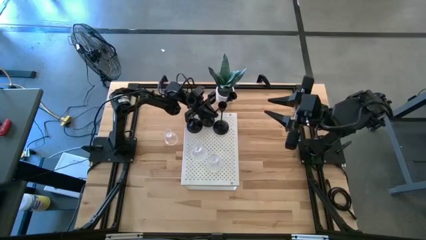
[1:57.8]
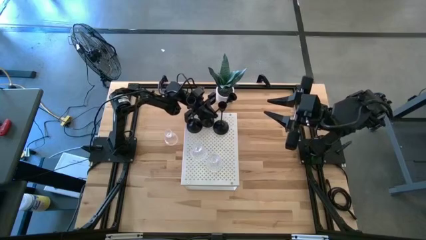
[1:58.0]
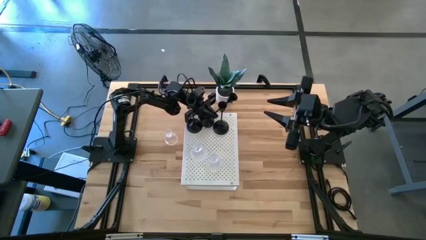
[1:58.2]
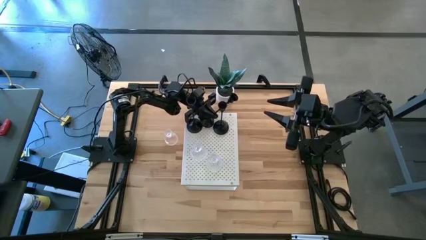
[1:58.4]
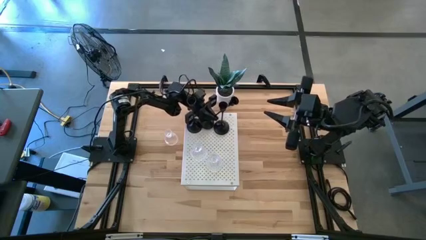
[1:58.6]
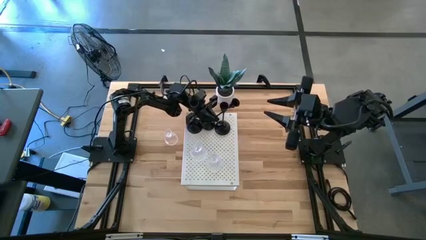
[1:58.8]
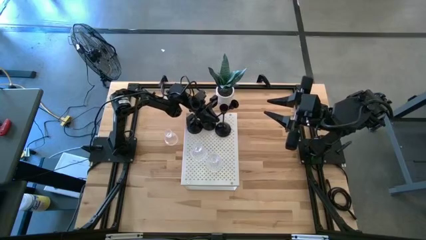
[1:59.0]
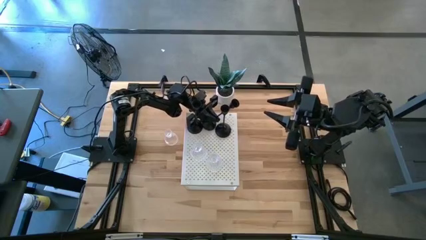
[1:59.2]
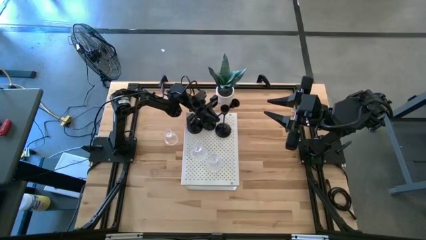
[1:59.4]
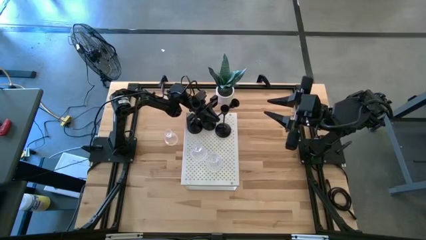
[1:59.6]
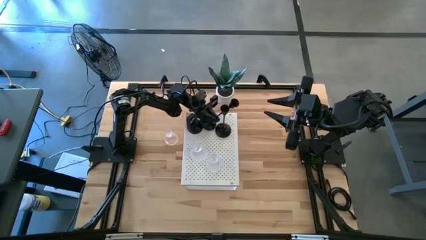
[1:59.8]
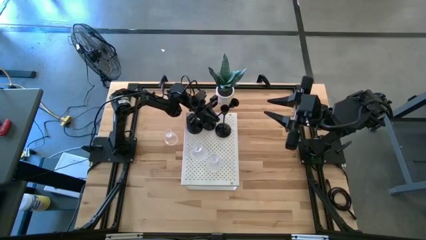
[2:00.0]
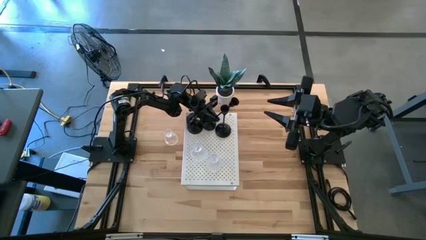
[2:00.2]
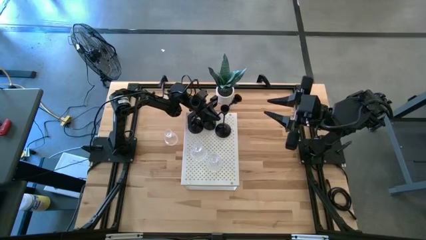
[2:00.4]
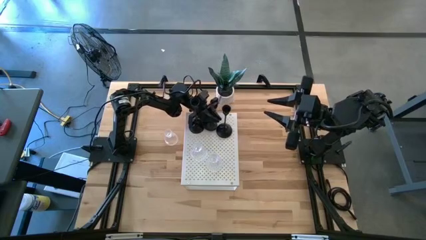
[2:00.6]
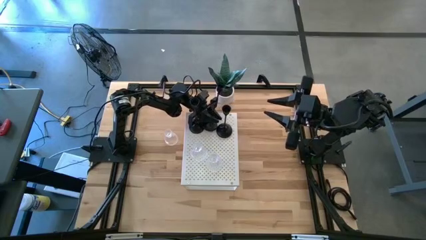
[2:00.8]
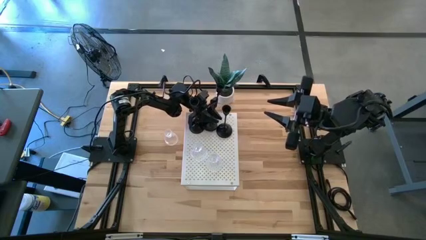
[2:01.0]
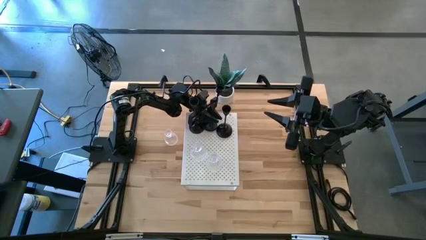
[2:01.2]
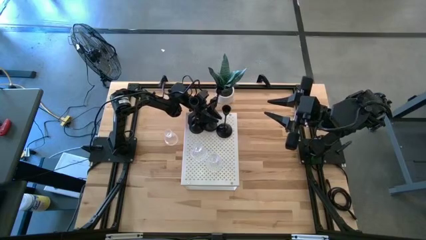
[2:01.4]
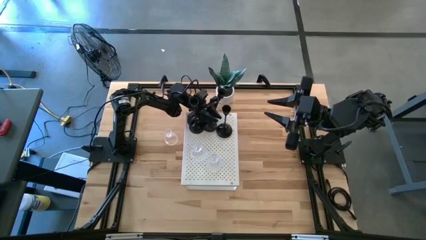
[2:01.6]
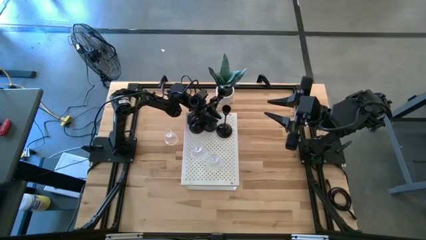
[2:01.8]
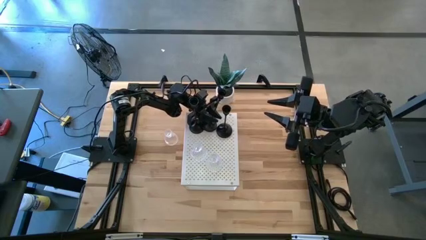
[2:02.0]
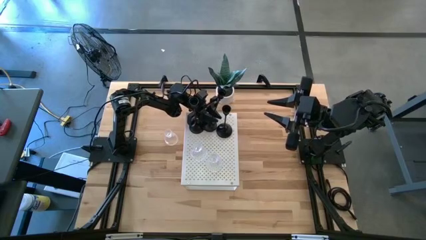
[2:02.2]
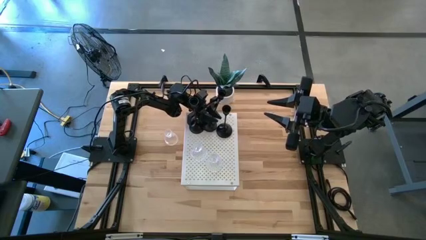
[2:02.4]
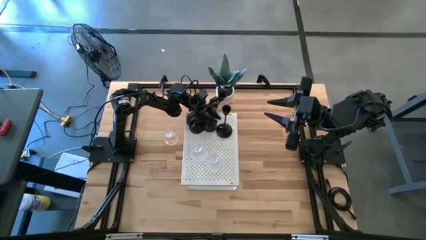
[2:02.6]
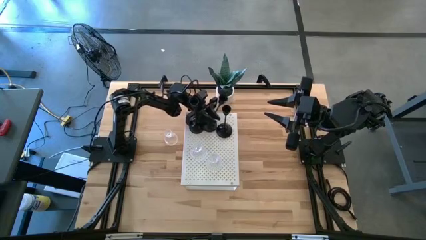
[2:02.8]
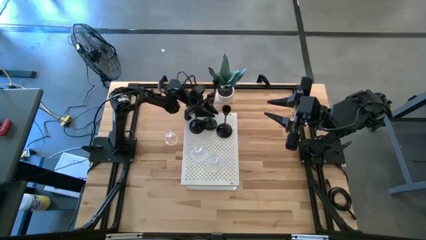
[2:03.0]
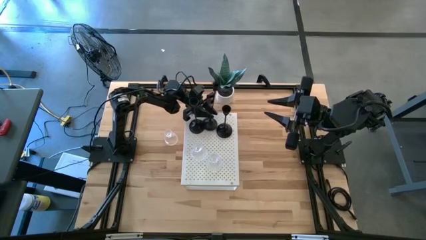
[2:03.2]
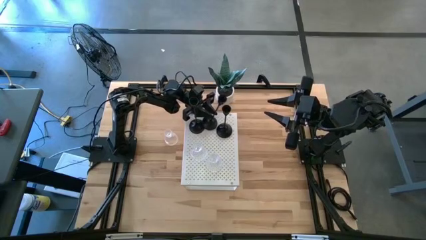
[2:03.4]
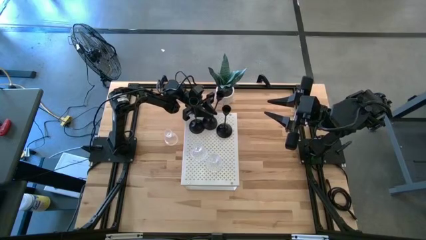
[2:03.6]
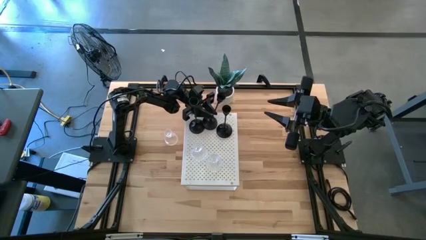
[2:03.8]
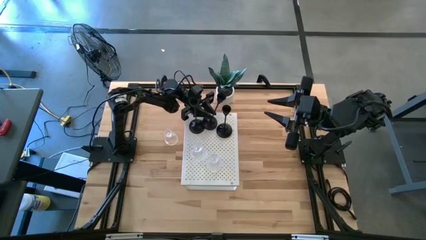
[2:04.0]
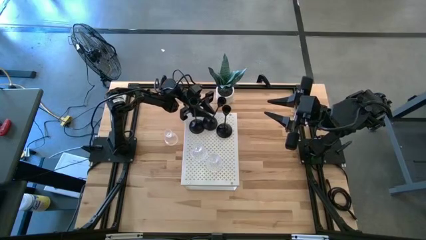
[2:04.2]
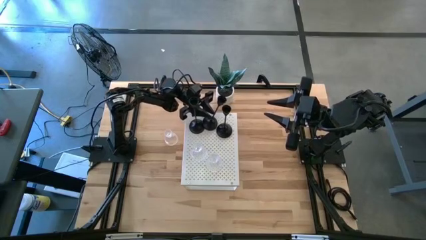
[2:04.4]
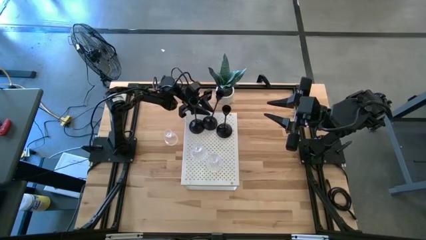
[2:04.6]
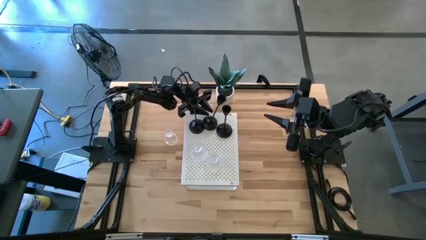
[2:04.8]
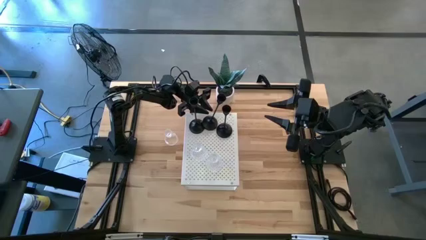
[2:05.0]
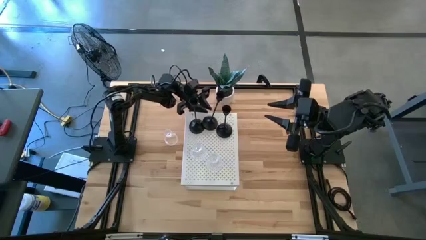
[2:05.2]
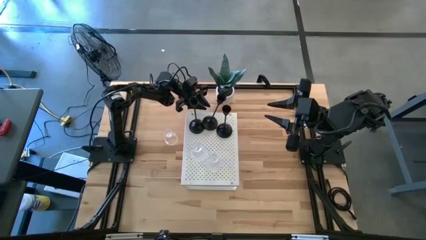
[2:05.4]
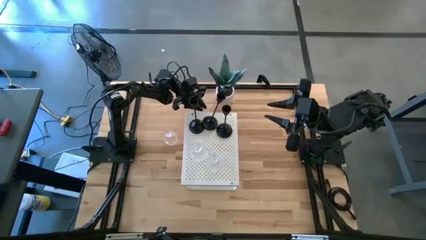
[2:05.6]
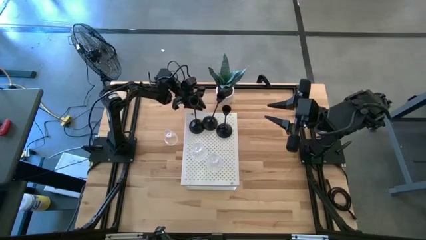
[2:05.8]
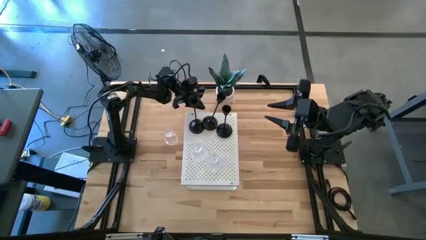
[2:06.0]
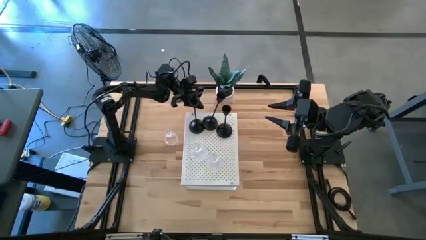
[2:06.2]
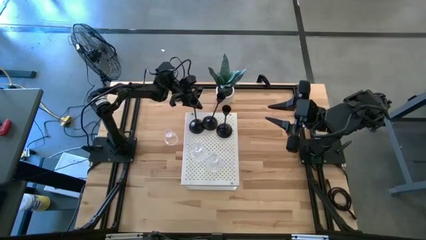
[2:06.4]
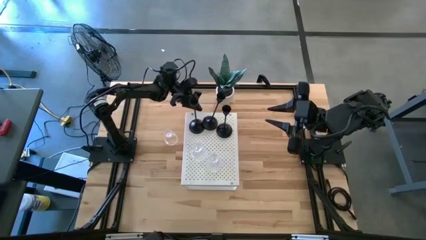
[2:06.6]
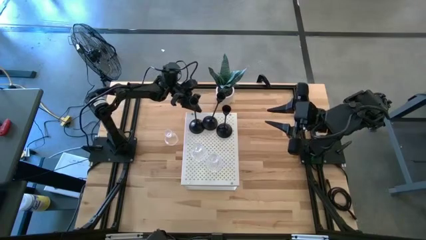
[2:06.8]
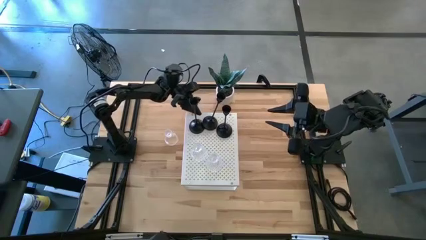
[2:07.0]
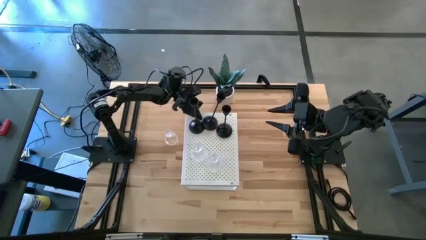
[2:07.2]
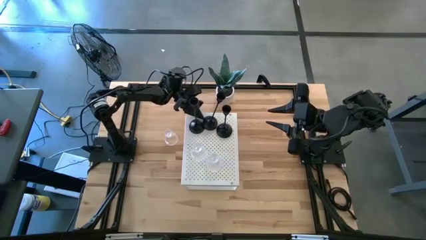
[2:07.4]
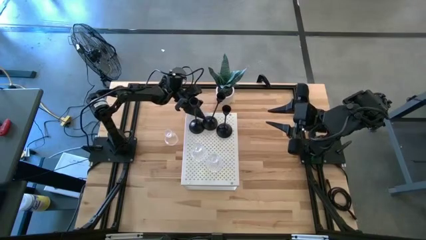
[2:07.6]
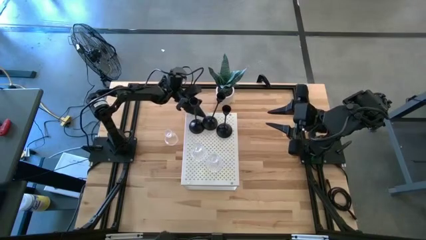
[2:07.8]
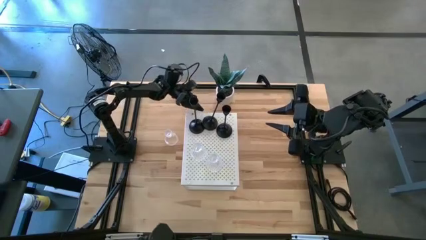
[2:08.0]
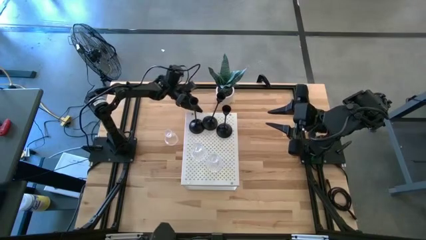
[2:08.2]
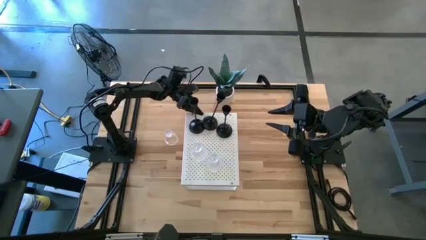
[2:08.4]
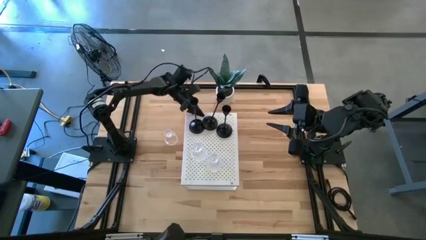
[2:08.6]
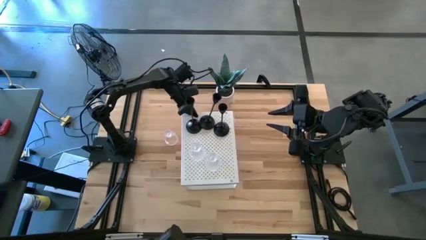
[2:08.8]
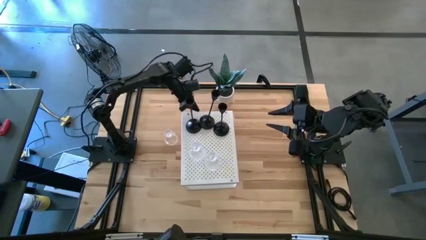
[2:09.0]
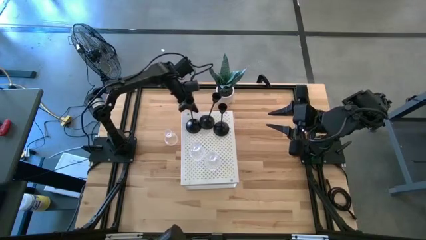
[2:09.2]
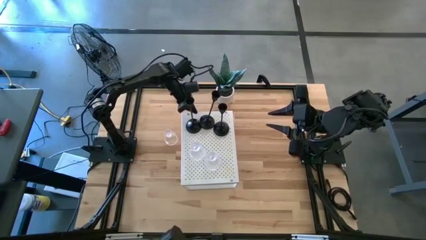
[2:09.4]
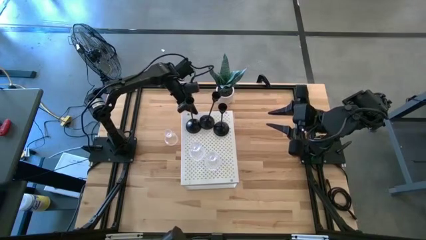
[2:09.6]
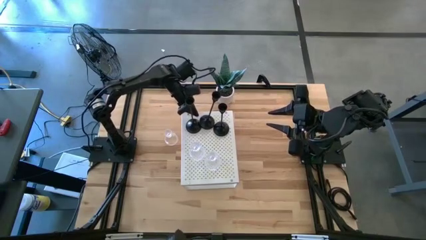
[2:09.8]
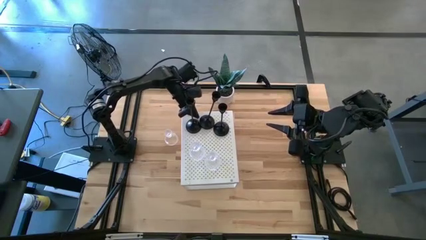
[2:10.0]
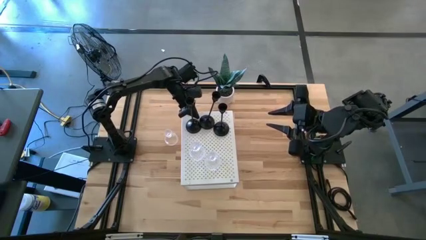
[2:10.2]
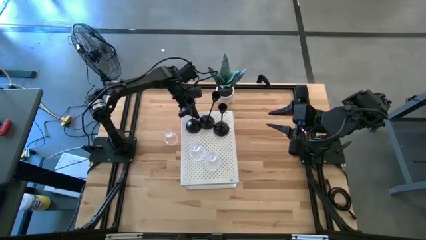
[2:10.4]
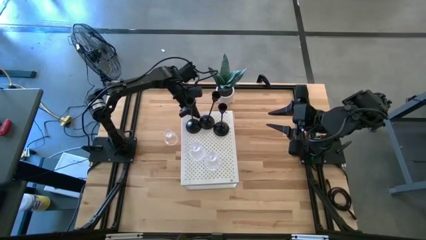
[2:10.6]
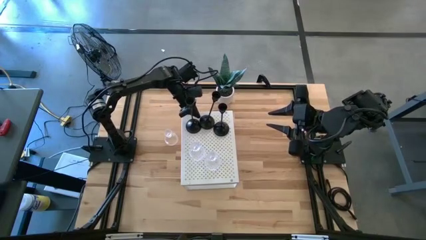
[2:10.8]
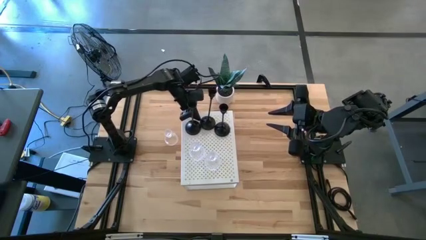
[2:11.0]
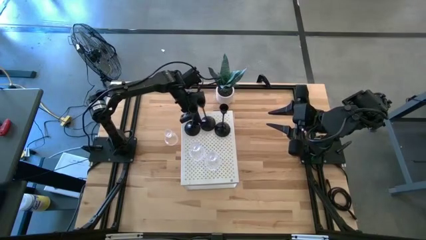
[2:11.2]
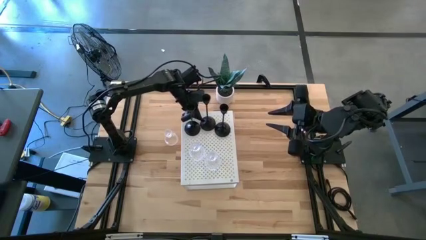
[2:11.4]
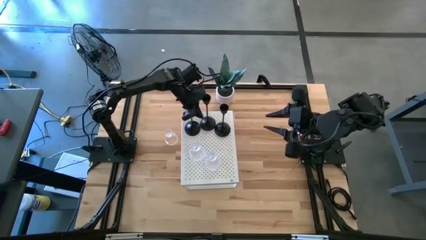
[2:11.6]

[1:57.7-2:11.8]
Task: Pick & Place candle stick holders
Put the black candle holder on the shelf

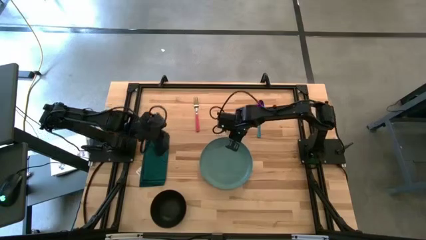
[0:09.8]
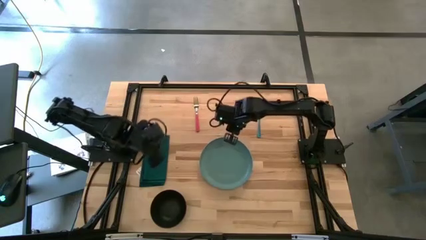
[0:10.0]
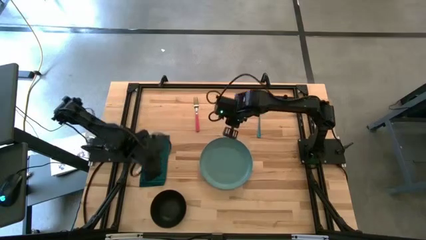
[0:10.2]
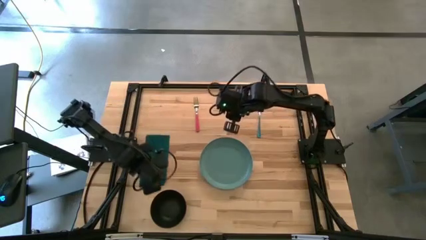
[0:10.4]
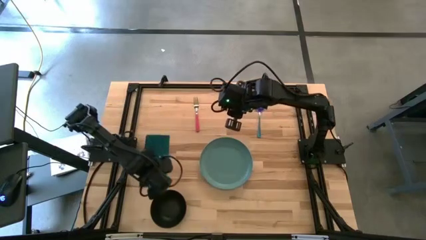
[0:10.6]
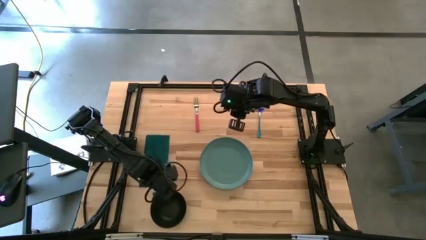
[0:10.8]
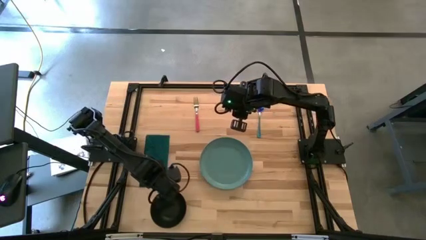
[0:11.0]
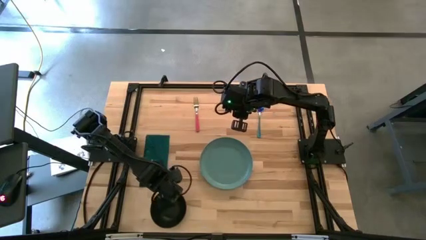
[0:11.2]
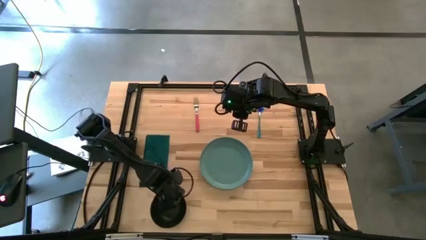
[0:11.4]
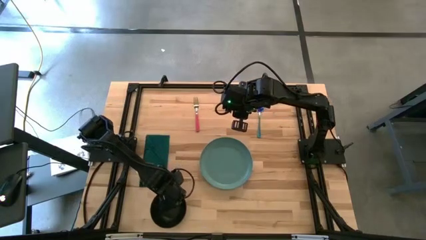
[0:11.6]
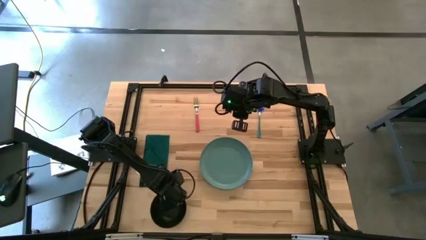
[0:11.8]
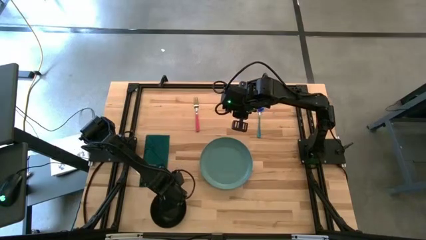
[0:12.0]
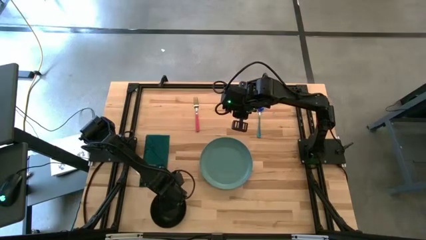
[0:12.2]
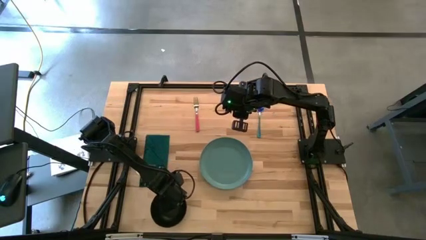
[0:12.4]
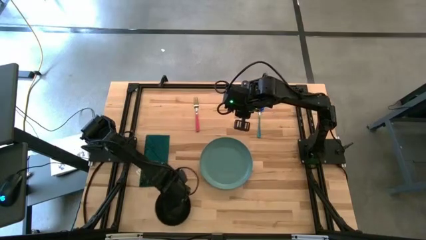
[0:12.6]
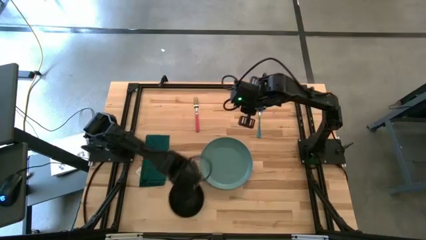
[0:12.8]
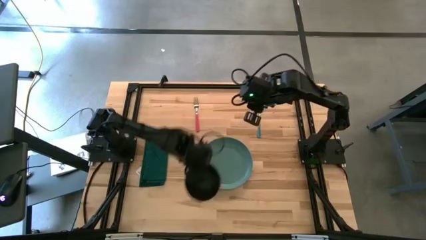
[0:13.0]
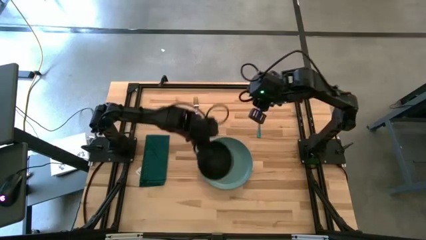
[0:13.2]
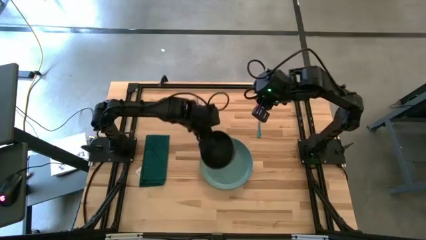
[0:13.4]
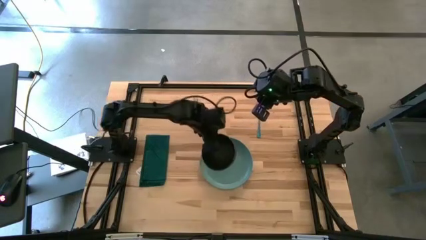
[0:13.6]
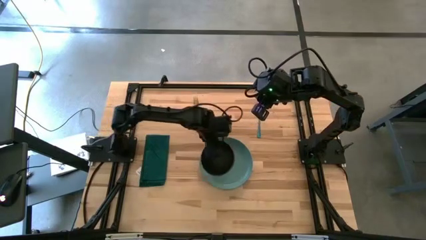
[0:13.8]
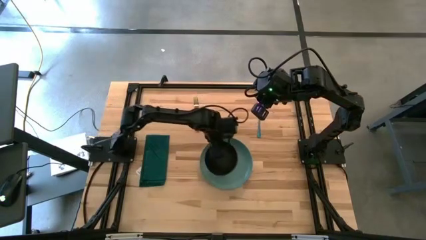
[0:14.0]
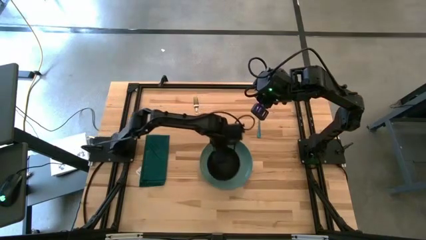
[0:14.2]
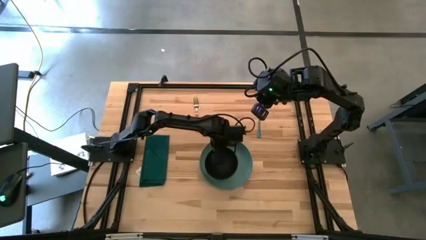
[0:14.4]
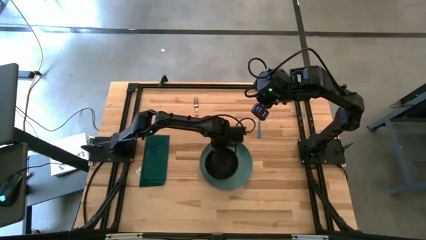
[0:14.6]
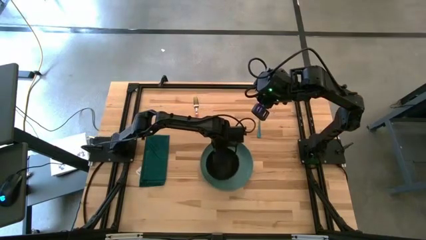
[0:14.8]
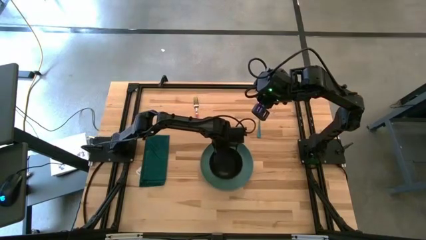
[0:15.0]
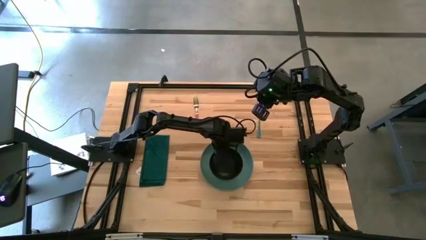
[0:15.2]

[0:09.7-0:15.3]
Task: Set table place
Put the black bowl on top of the blue plate
